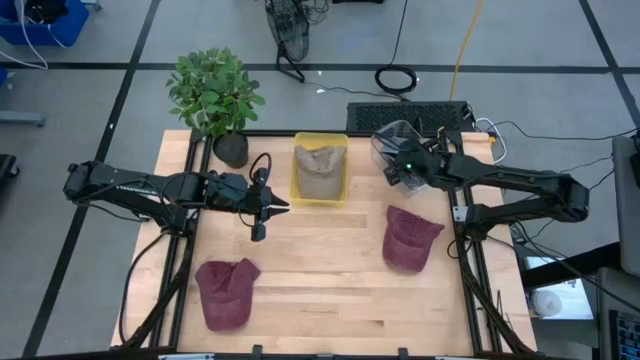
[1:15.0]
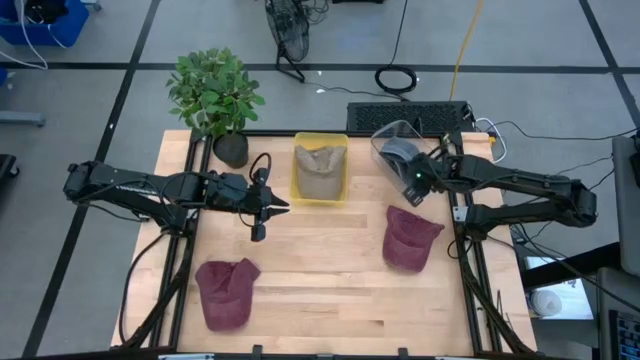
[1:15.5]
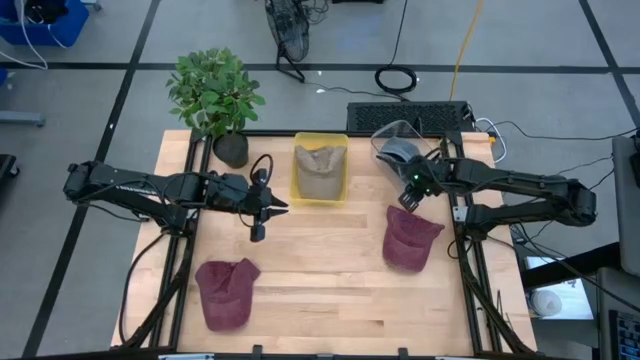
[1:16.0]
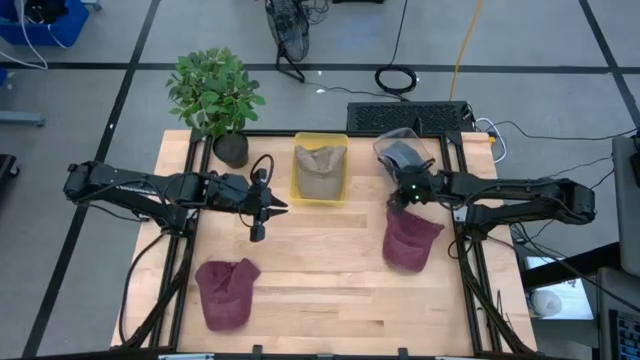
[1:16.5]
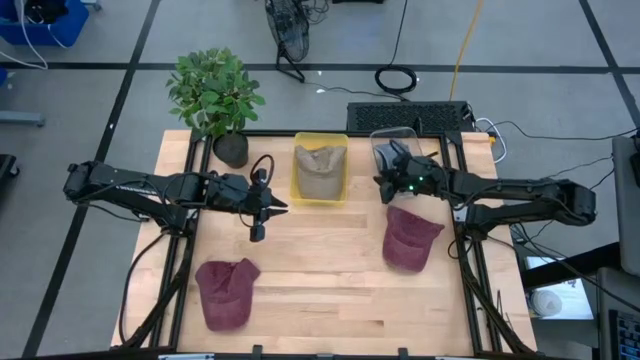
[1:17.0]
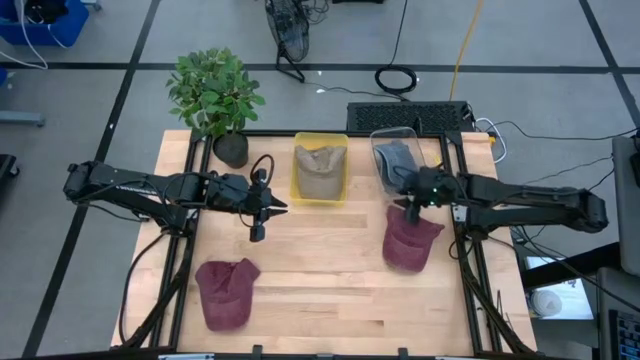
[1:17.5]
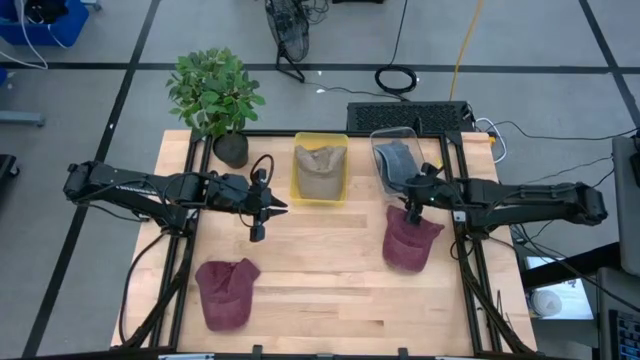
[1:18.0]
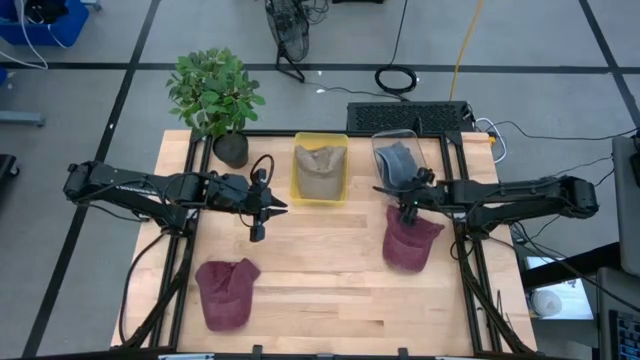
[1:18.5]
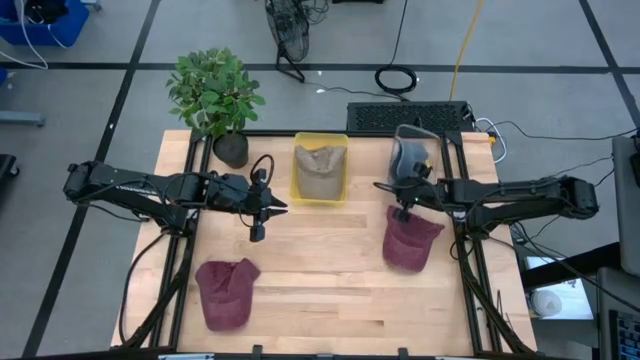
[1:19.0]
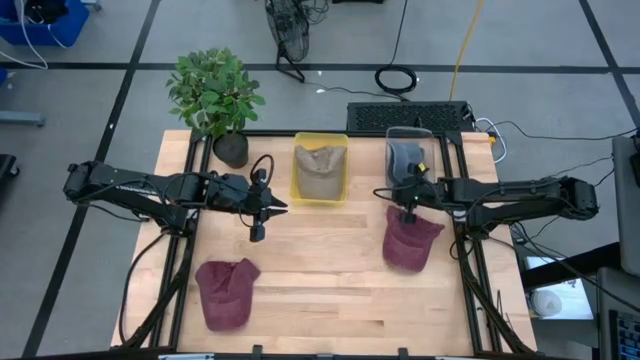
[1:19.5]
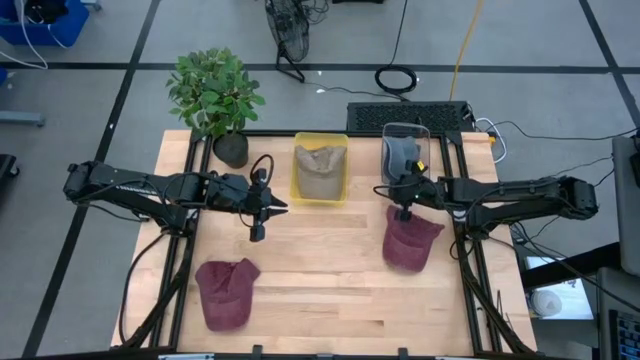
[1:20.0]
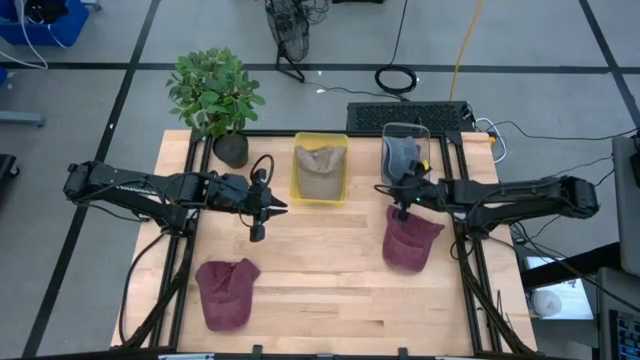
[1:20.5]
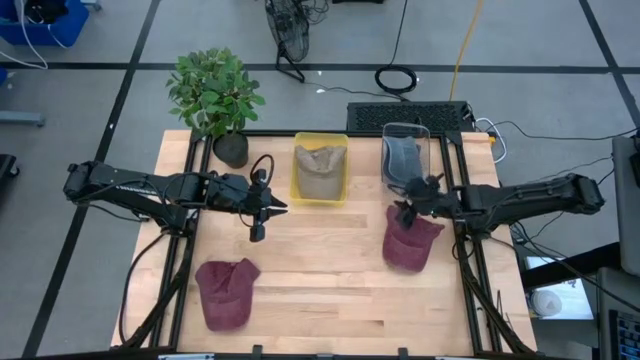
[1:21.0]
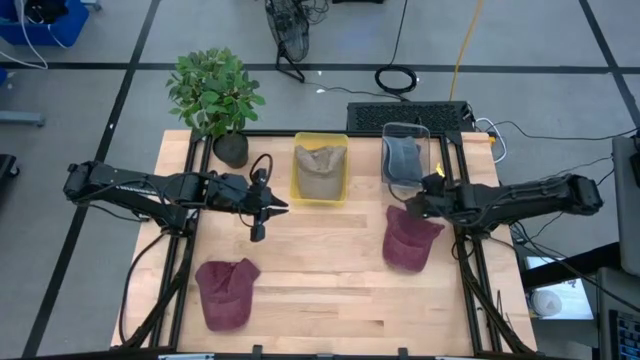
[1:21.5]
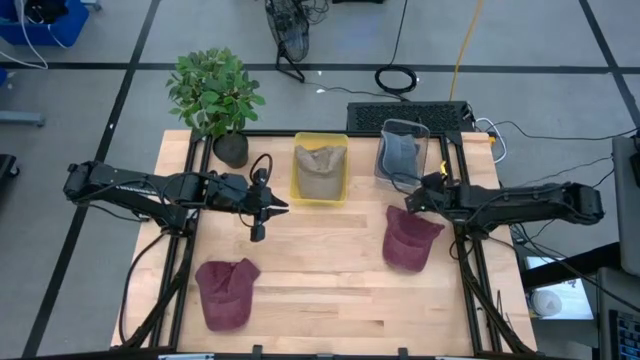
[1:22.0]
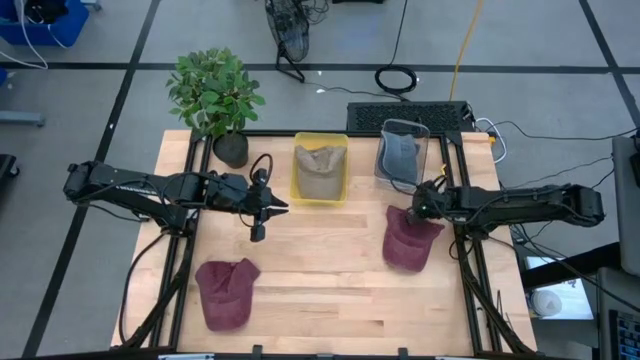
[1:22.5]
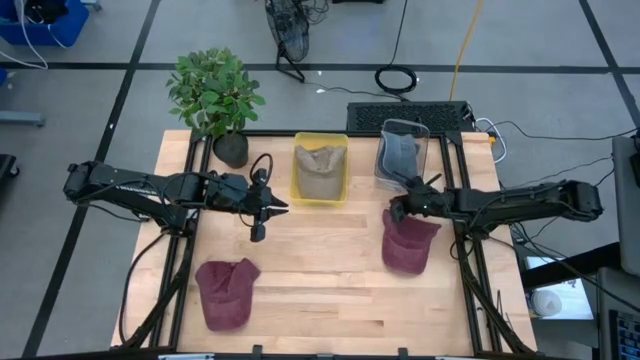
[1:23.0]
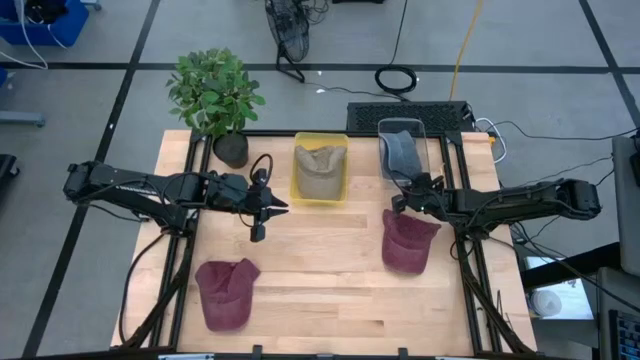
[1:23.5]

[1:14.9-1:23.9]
Task: Pick & Place hat
Adjust the transparent bin on the table

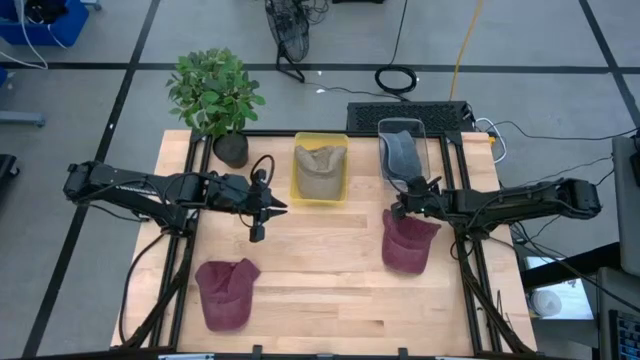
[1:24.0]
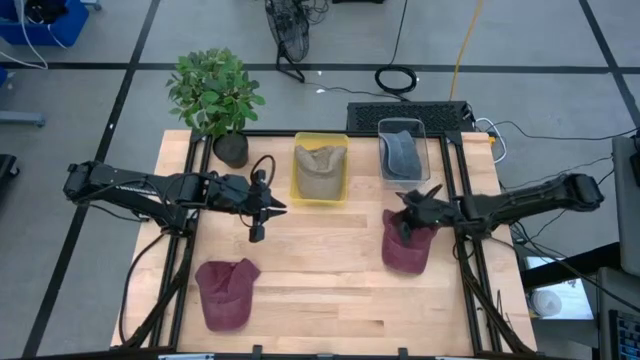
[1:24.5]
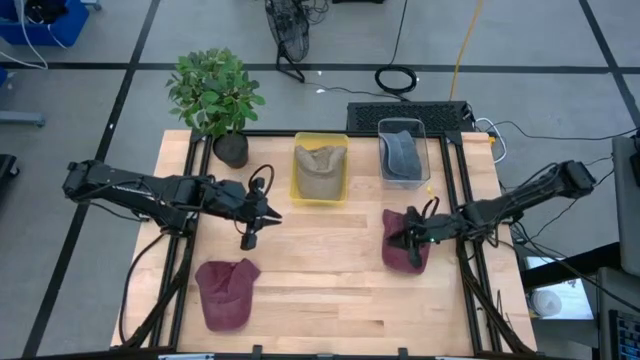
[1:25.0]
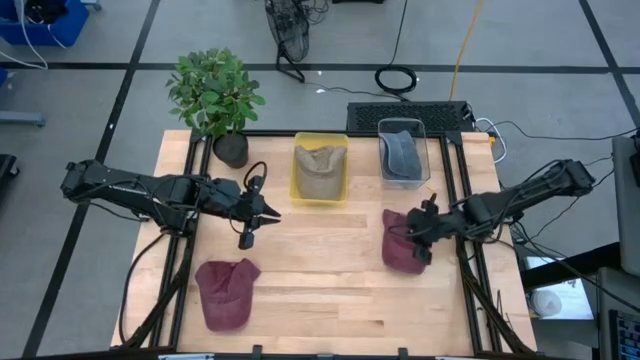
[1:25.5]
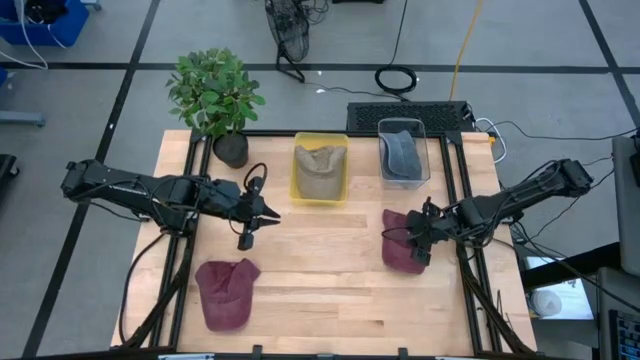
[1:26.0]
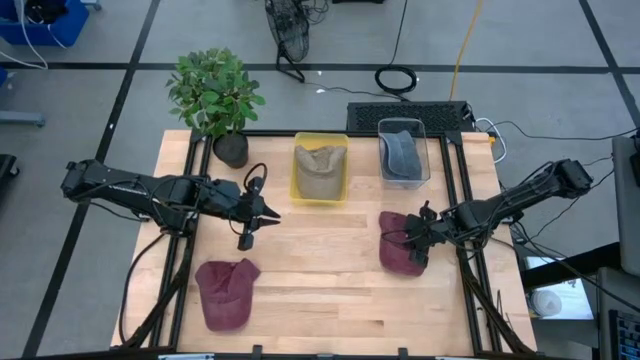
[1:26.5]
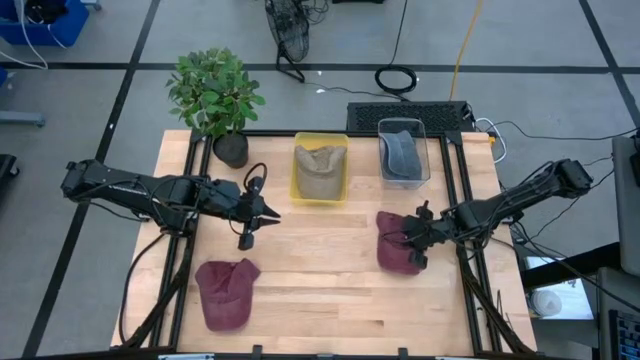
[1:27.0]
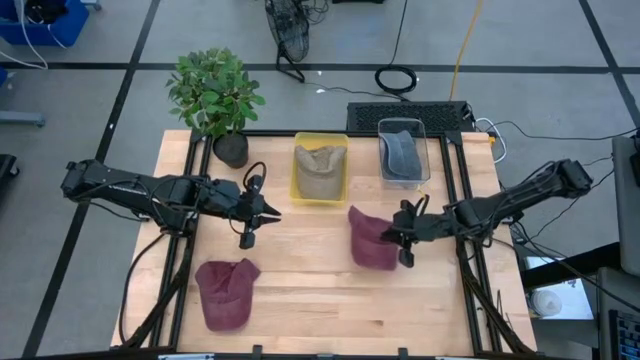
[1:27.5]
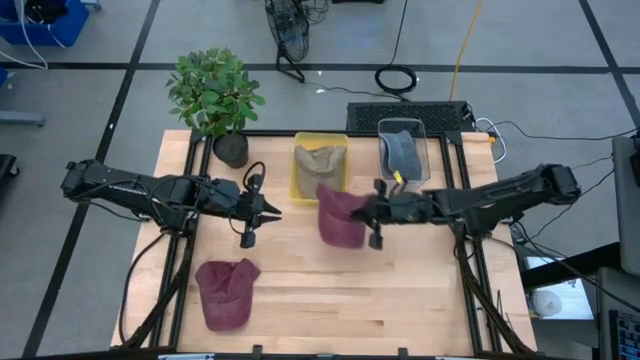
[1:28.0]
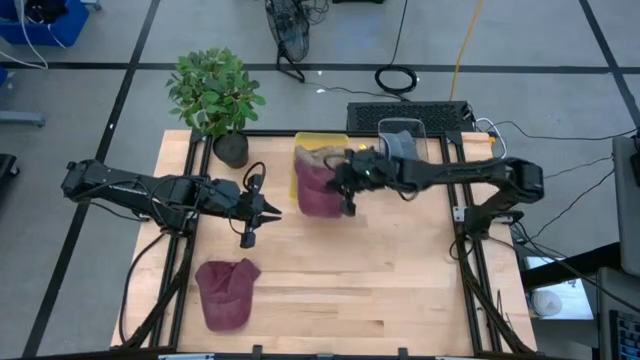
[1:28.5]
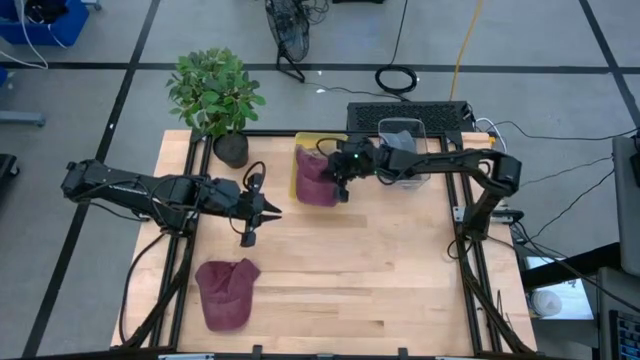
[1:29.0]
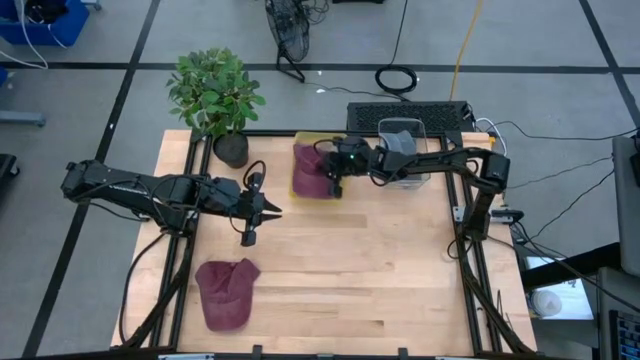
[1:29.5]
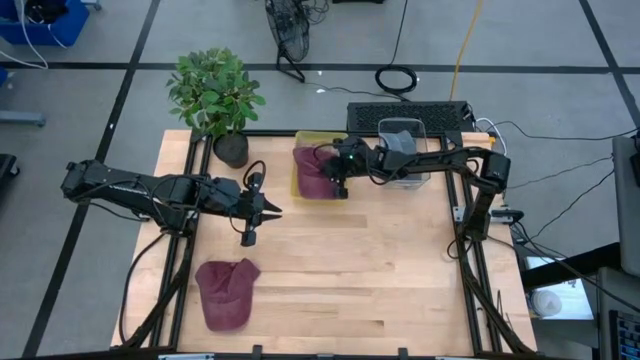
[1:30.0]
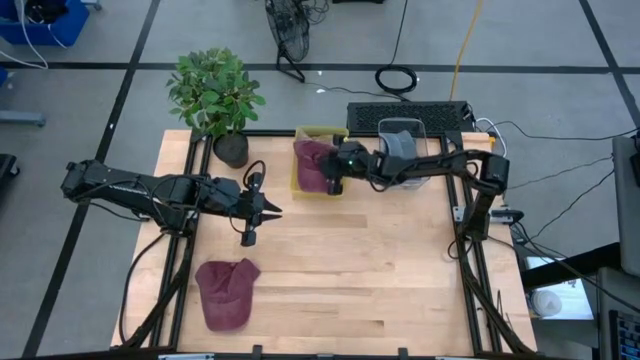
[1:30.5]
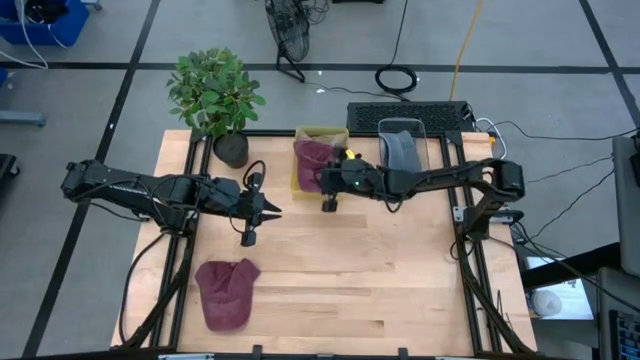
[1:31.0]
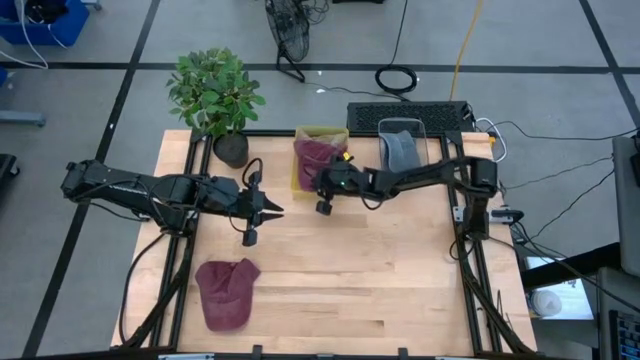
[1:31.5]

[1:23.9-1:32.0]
Put the top red cap into the yellow bin

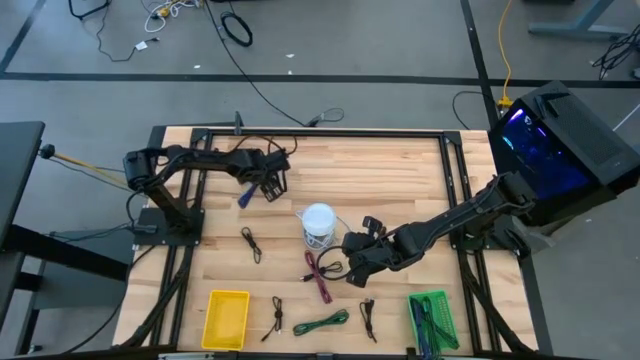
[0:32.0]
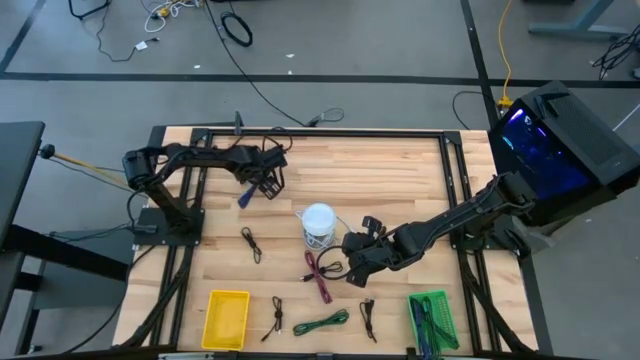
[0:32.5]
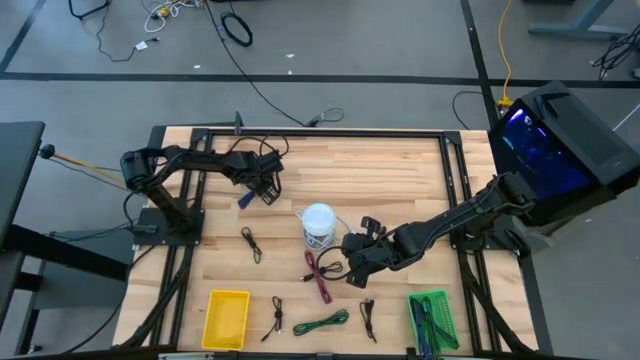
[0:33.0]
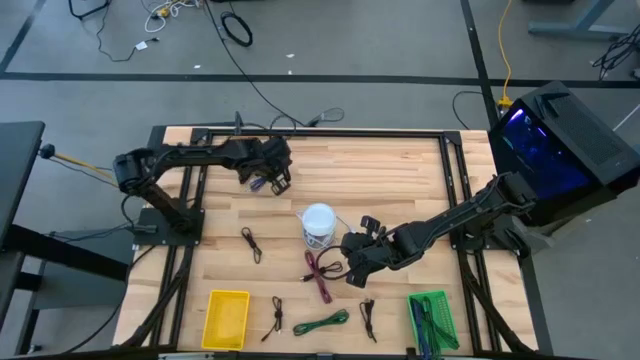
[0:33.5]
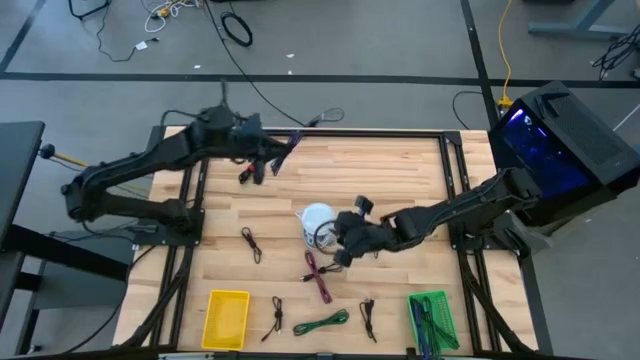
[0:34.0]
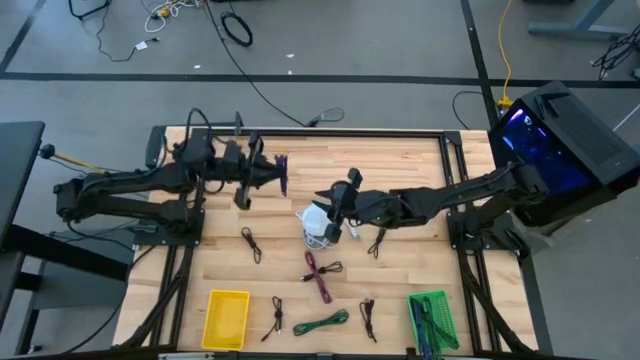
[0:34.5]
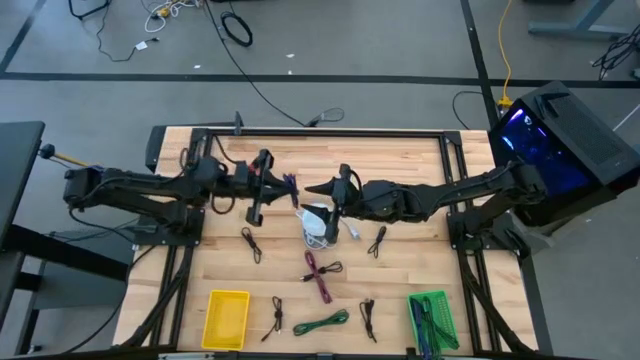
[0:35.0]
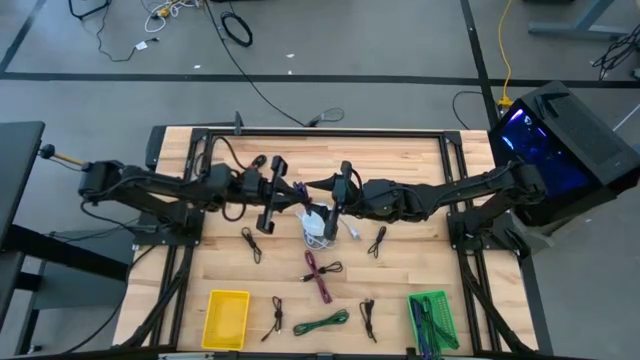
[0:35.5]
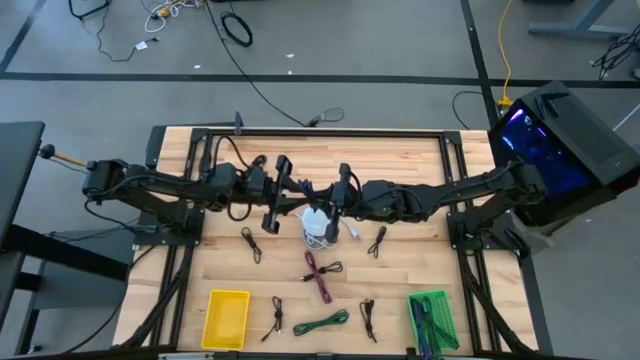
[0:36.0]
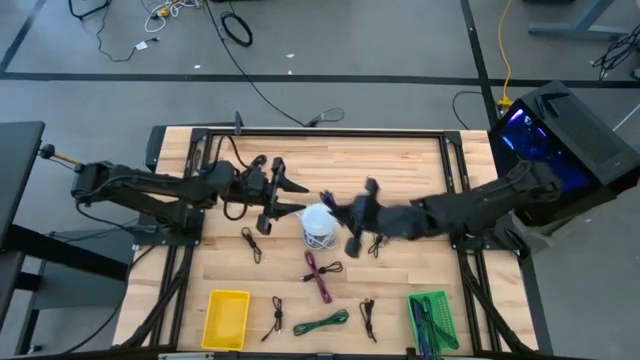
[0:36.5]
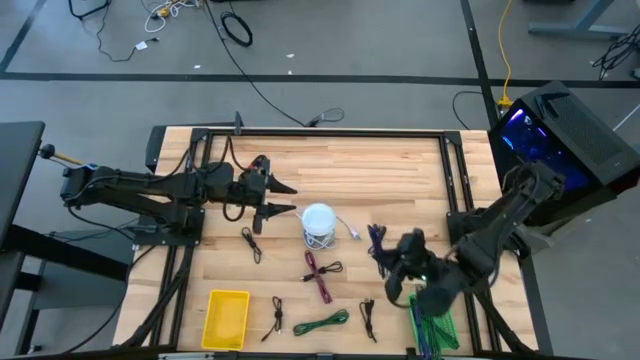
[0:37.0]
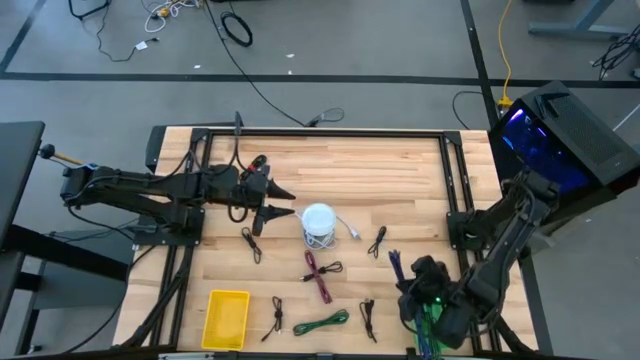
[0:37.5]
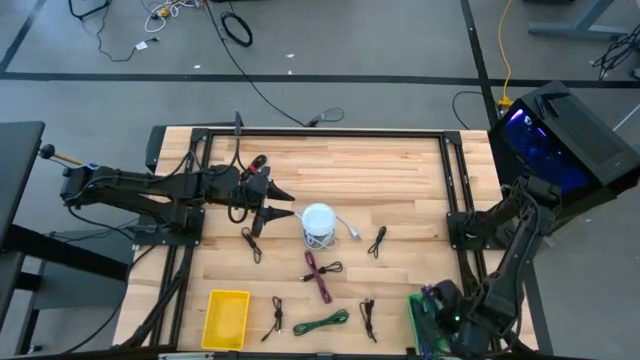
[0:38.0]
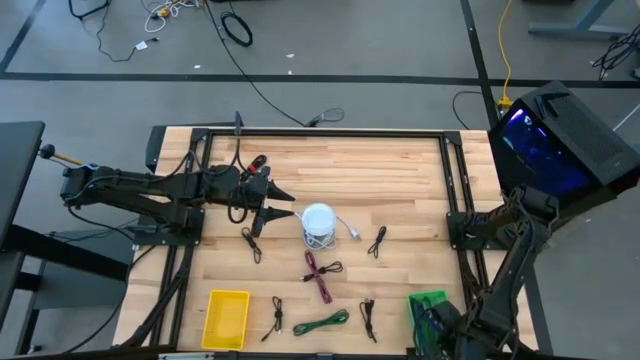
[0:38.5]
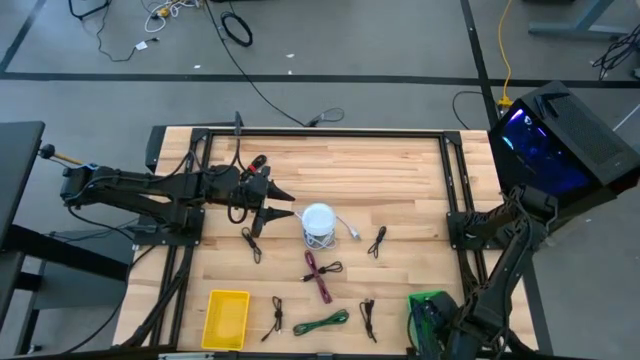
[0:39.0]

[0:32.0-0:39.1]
Task: Pick & Place USB Port
Put the purple charger cable into the green bin
